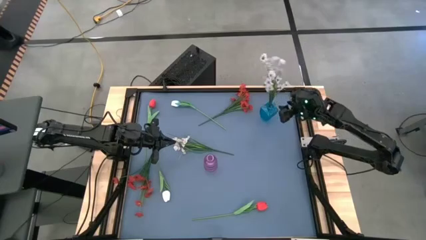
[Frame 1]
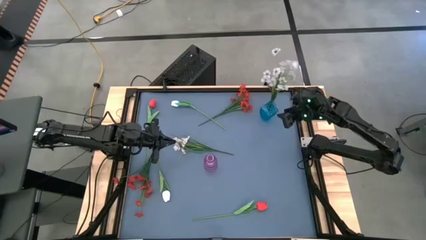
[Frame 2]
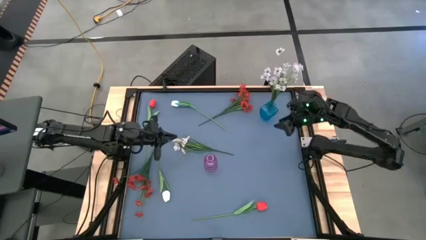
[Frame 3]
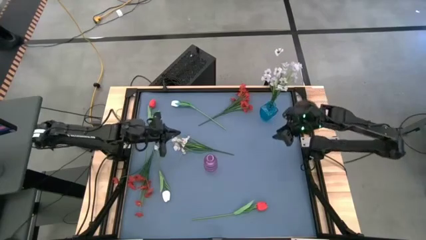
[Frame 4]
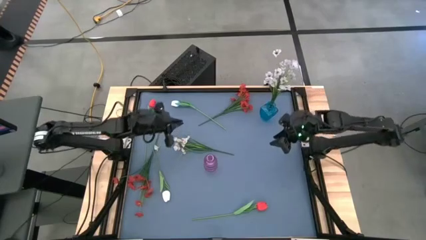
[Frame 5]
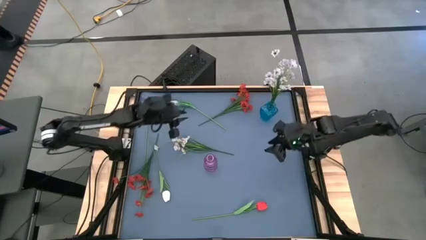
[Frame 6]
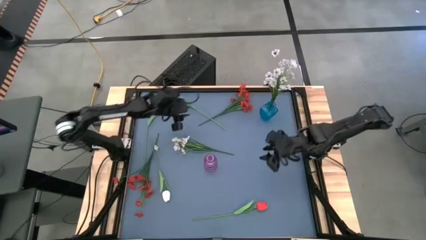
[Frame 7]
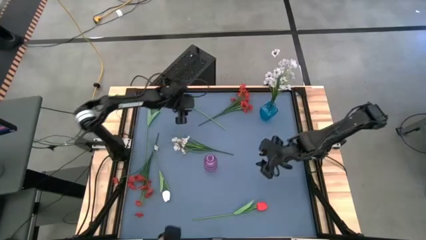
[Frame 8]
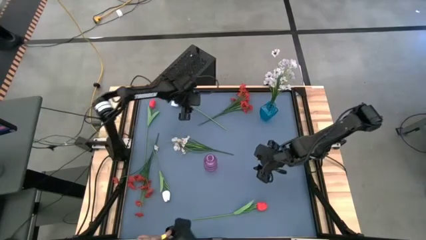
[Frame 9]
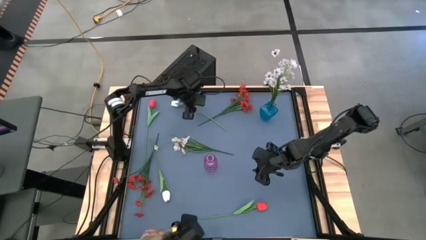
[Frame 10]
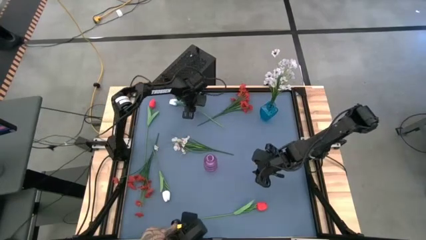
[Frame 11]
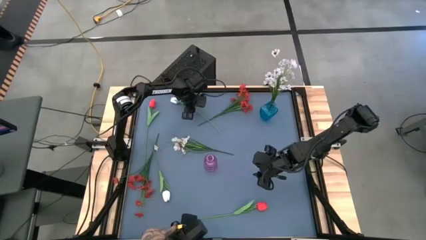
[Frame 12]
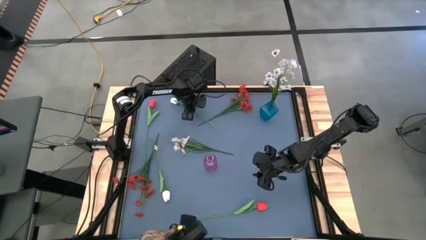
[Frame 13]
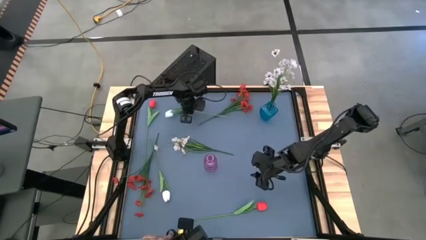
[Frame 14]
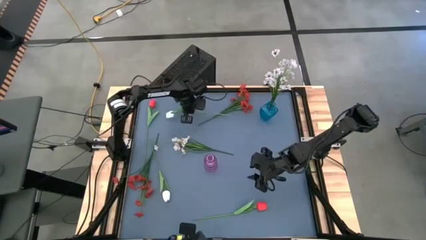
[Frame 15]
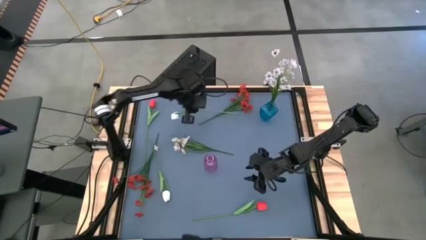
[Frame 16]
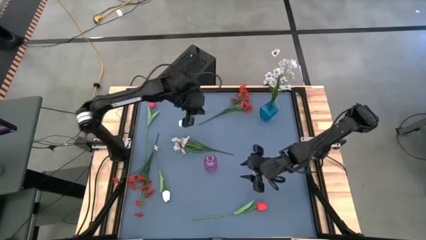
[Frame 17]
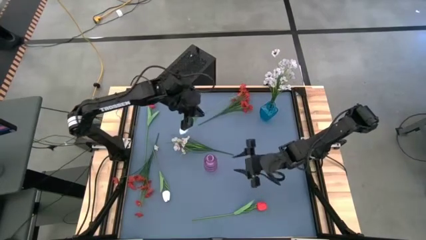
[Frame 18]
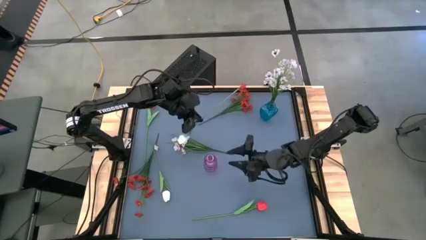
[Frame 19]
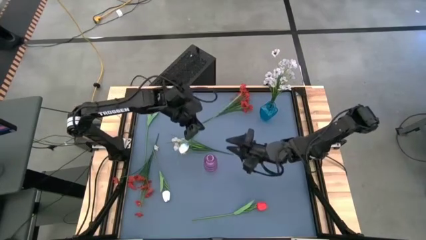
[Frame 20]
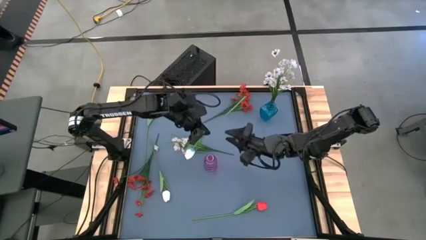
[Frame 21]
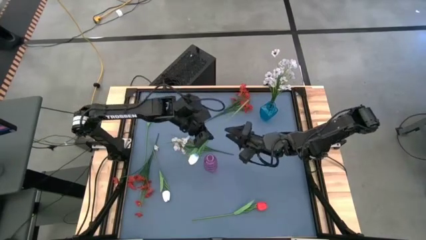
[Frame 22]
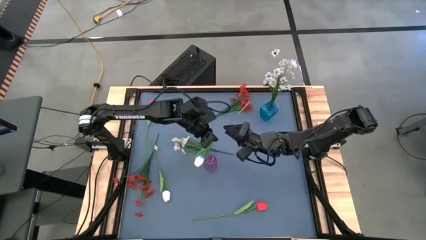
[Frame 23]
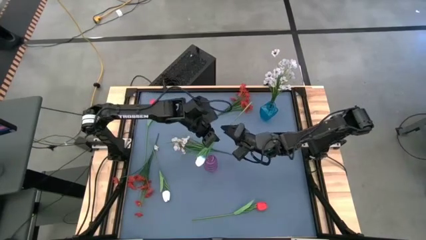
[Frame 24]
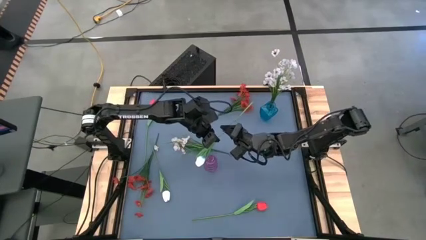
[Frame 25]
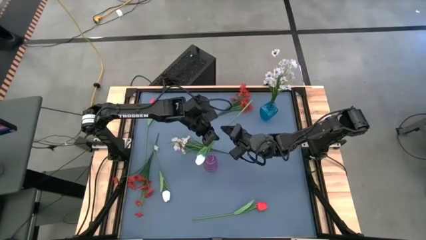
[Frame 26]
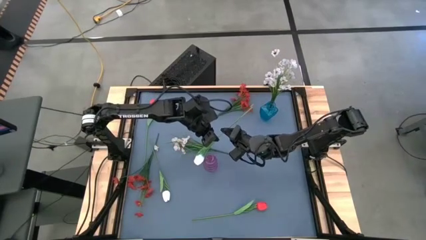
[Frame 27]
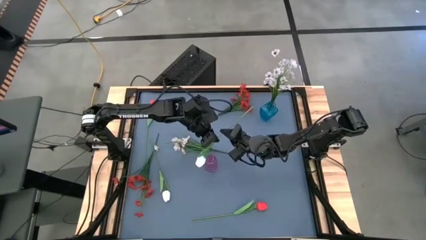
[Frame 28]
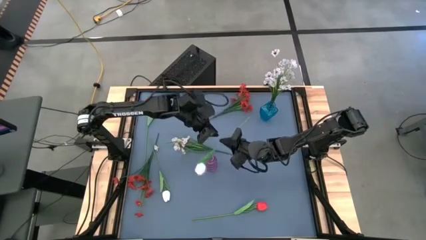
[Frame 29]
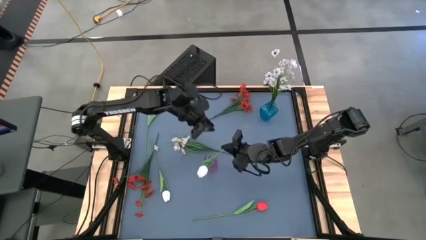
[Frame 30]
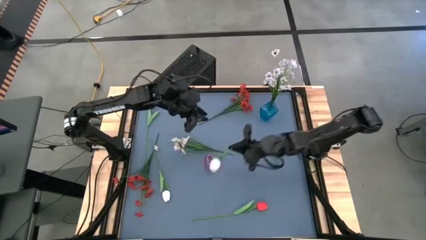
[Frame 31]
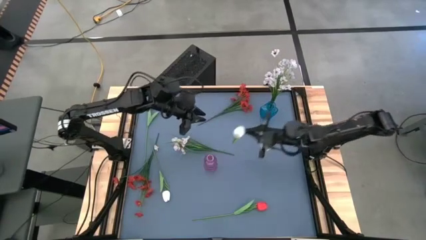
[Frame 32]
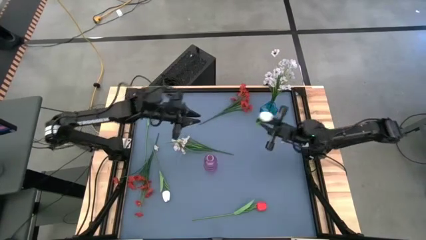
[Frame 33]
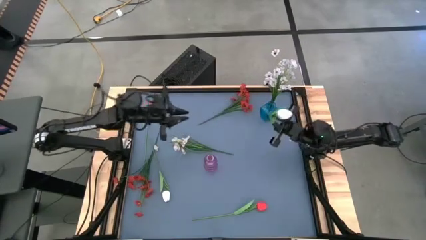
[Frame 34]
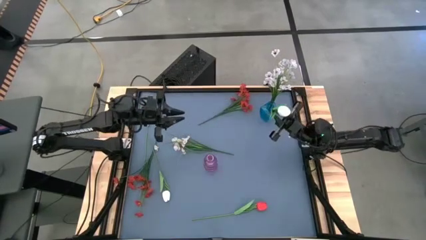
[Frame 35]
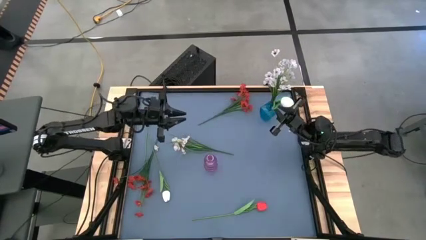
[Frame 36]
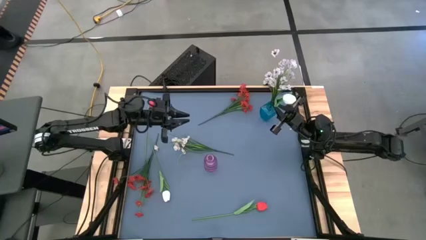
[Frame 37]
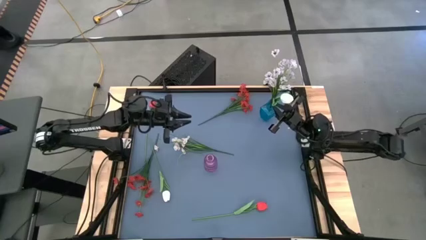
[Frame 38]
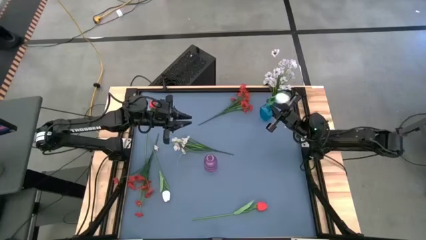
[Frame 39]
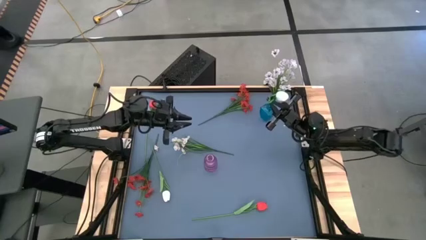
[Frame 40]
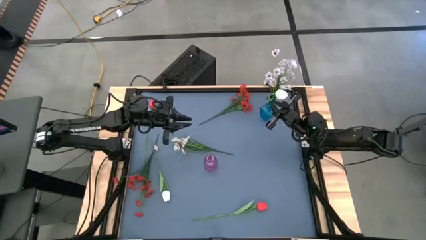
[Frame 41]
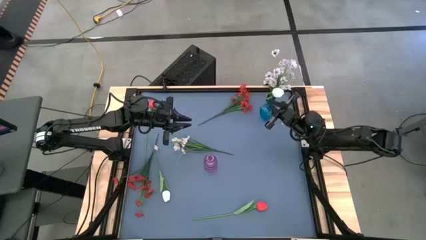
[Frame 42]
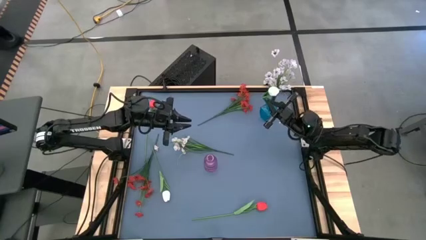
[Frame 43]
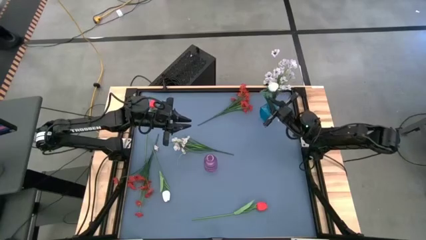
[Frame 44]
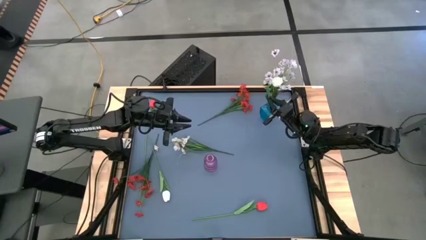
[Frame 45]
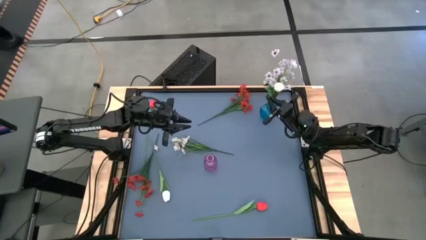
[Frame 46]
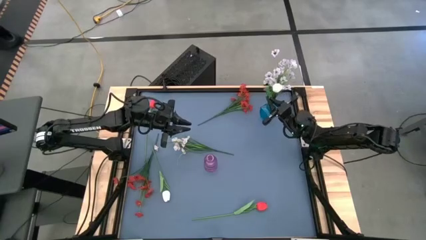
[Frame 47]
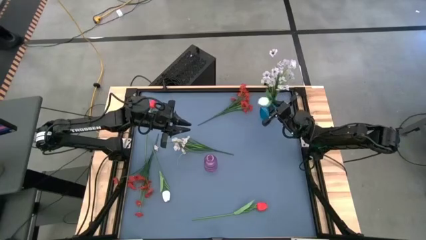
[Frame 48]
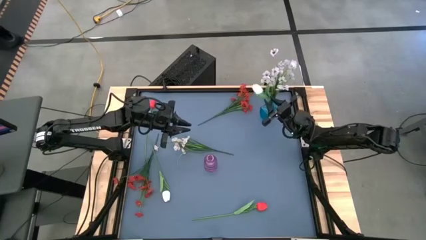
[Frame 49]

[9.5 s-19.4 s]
Task: Sort flowers into vase by color
Put the top white flower into the blue vase

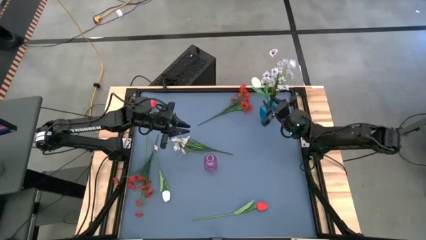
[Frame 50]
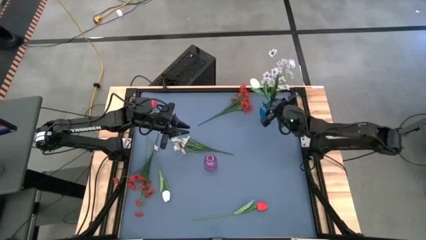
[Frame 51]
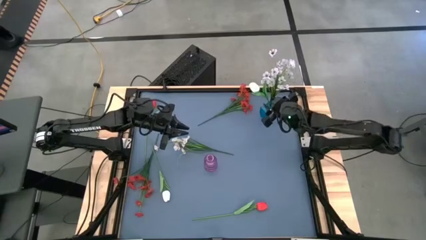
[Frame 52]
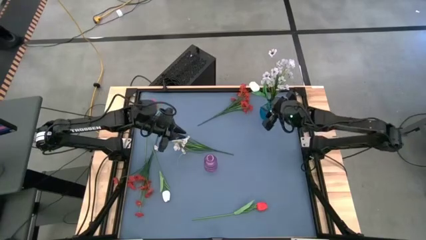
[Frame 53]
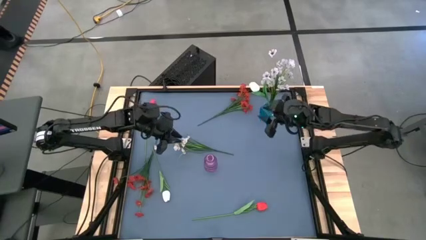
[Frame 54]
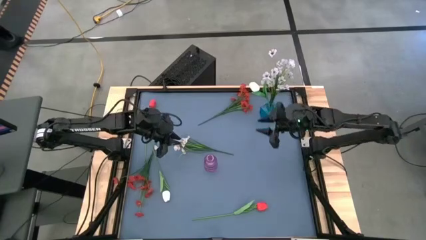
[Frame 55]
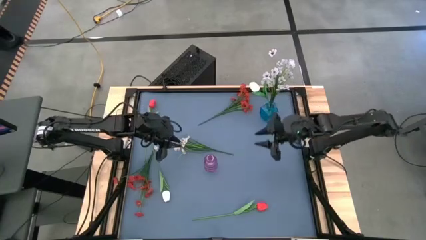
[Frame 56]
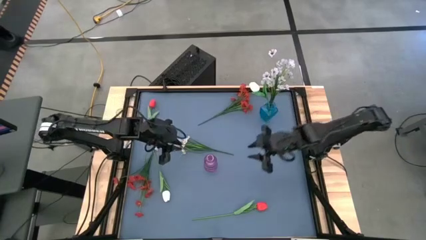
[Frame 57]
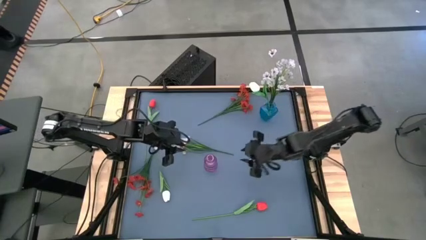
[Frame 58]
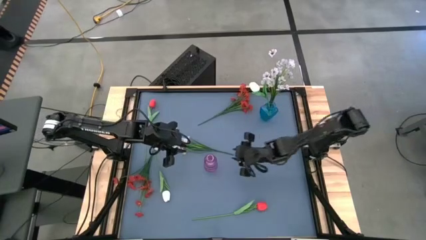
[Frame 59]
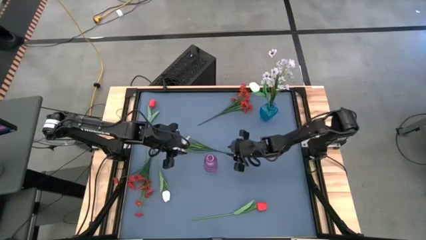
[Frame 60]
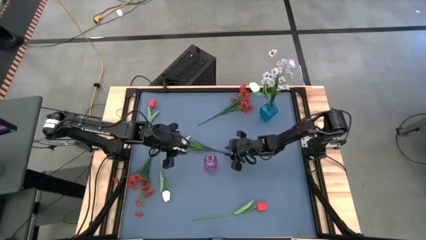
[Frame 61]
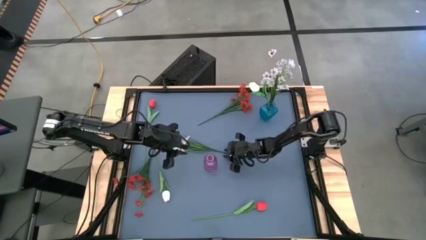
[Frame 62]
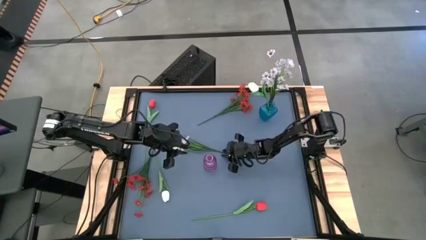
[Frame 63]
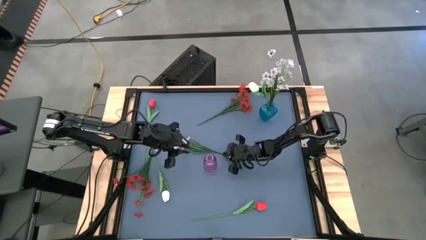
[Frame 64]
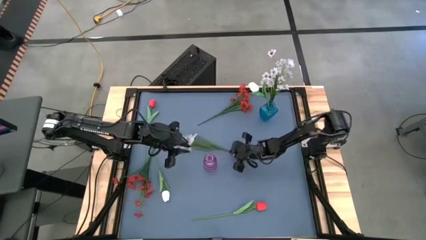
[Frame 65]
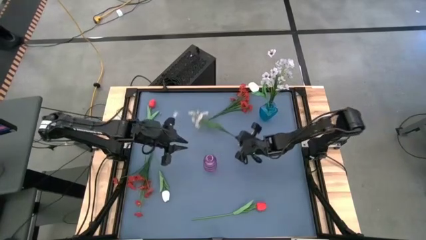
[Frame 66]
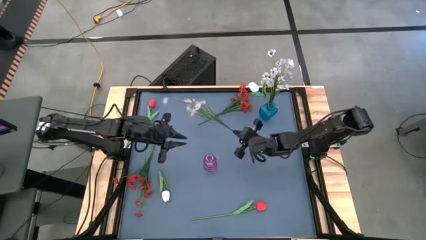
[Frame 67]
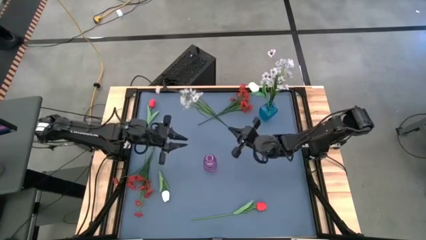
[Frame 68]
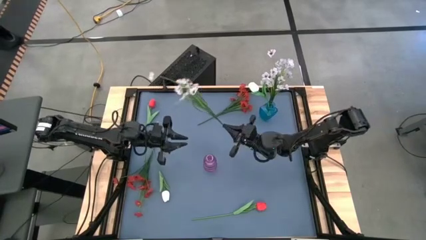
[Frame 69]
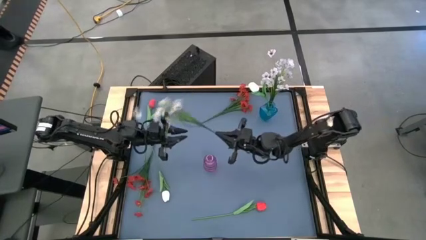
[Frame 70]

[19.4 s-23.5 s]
Put the white flowers into the blue vase

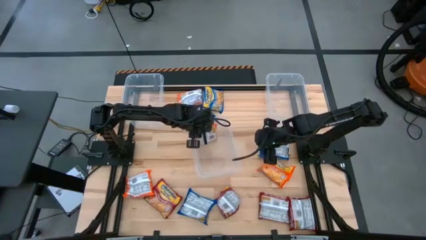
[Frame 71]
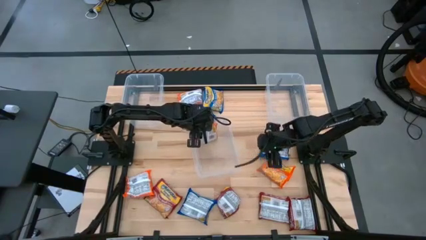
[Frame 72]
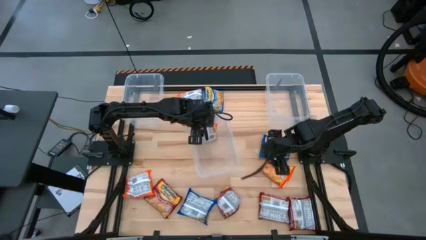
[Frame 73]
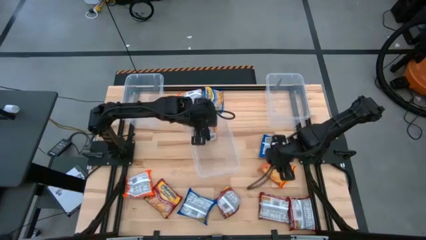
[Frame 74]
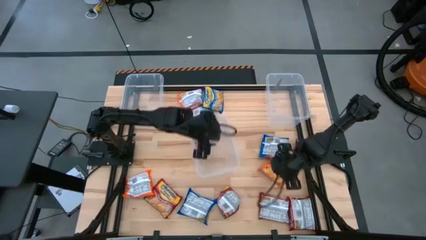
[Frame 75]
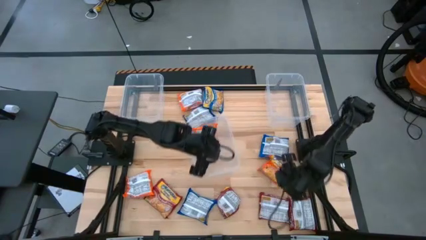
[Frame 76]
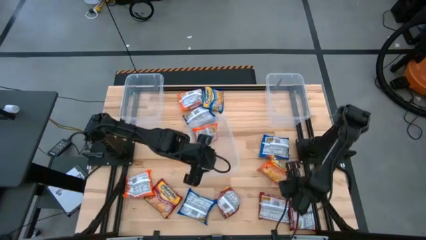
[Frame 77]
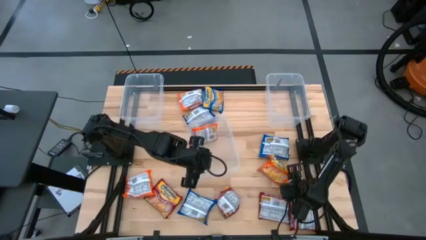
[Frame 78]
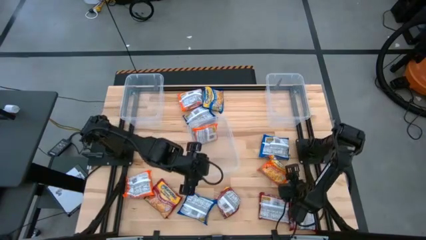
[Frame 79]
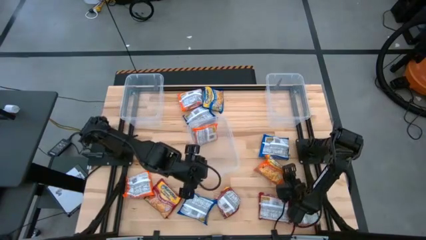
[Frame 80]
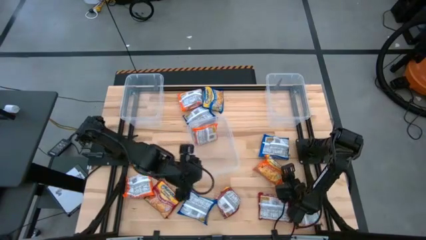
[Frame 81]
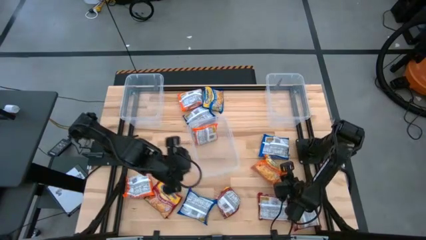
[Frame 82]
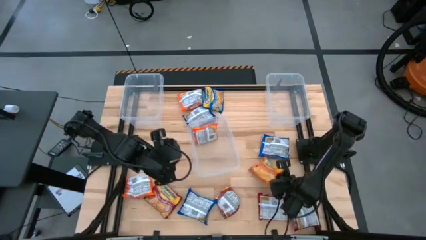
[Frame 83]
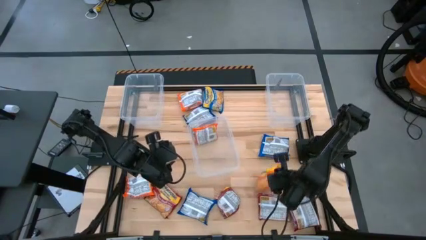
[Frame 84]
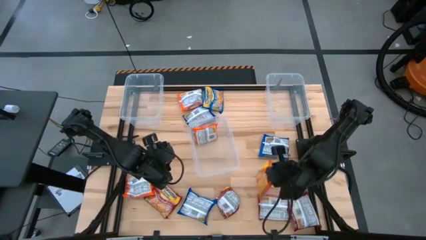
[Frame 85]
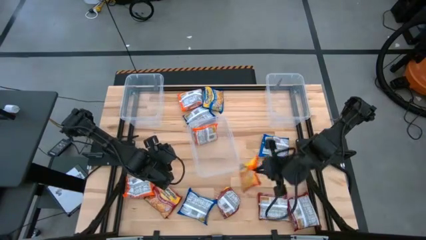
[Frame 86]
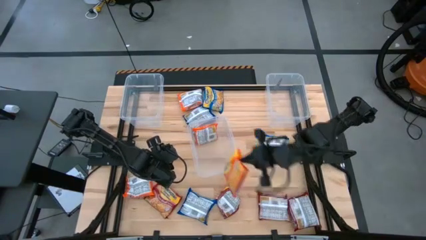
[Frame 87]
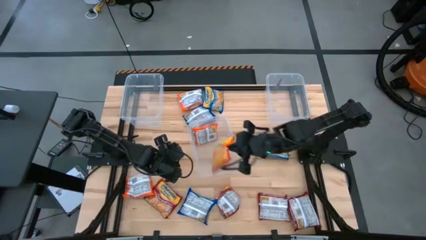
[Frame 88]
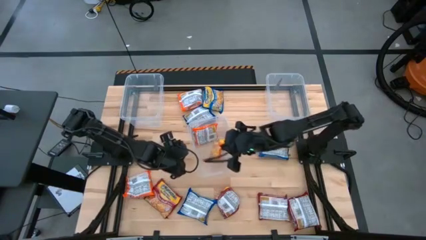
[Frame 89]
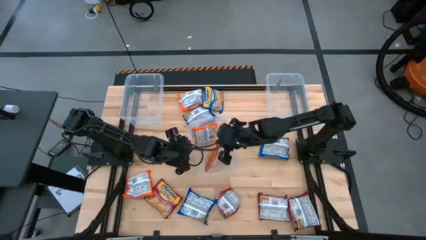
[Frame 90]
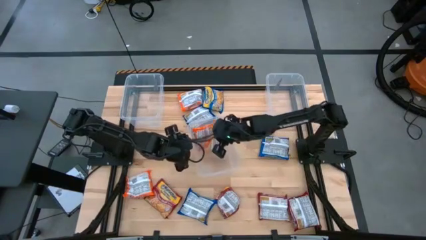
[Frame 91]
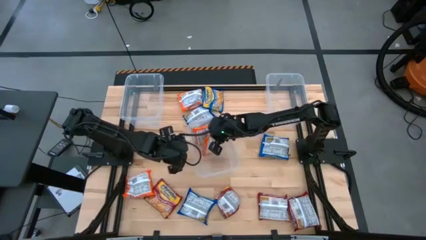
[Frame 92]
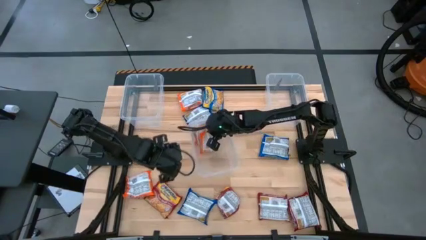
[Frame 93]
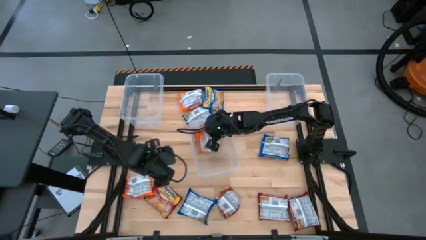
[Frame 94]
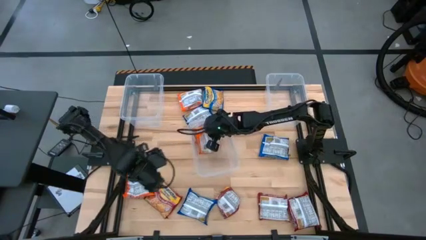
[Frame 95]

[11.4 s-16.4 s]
Task: Sort Maruchan noodles
Put the orange noodle pack into the middle transparent bin
